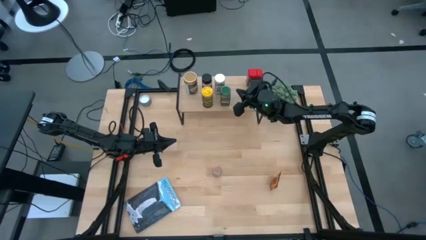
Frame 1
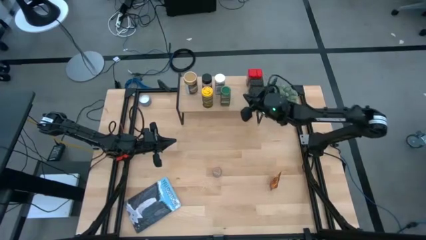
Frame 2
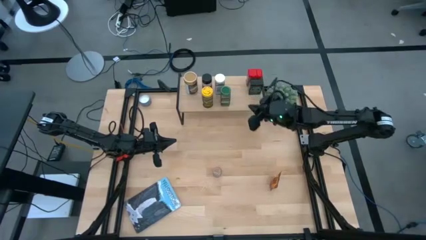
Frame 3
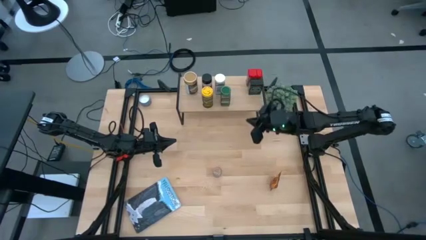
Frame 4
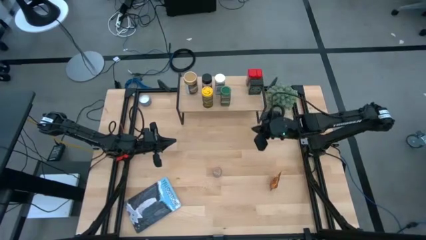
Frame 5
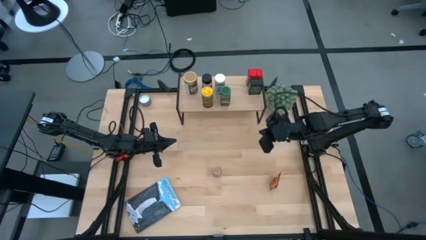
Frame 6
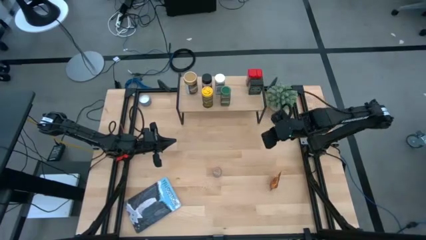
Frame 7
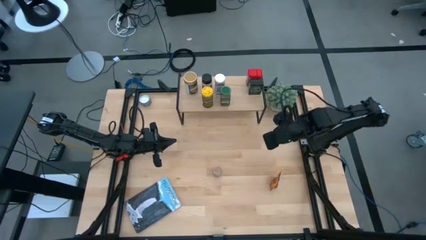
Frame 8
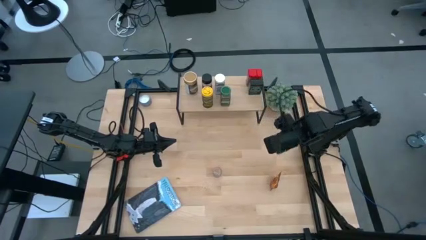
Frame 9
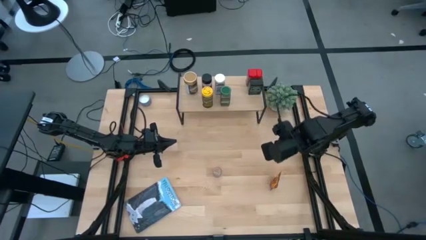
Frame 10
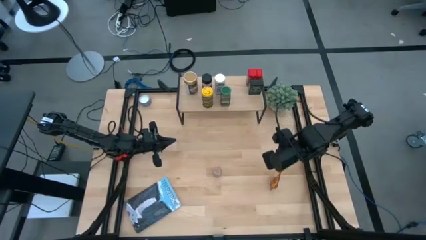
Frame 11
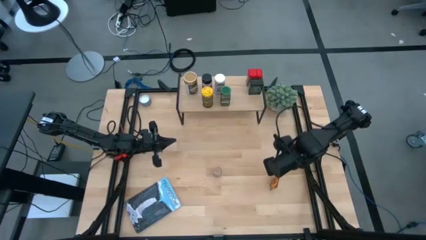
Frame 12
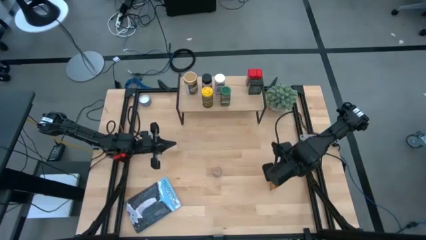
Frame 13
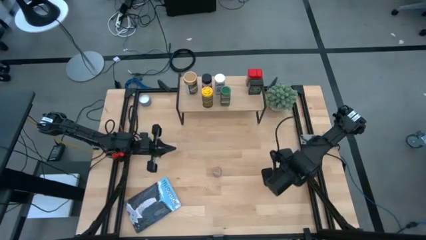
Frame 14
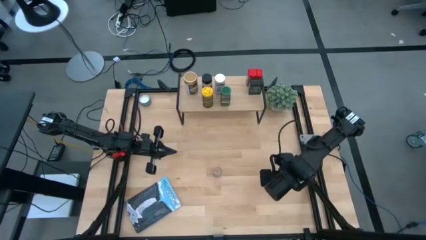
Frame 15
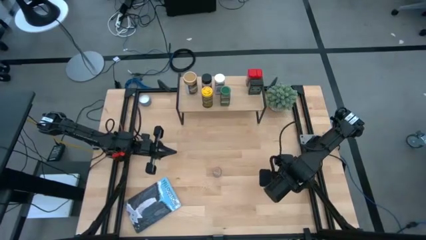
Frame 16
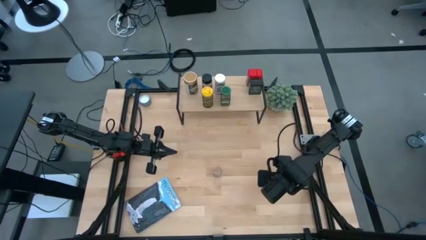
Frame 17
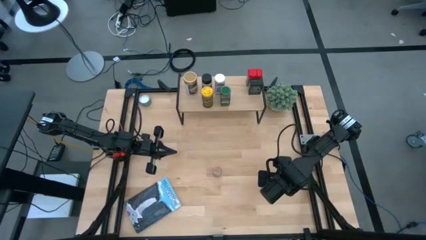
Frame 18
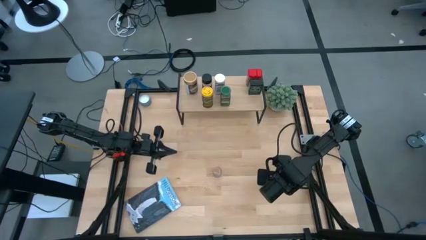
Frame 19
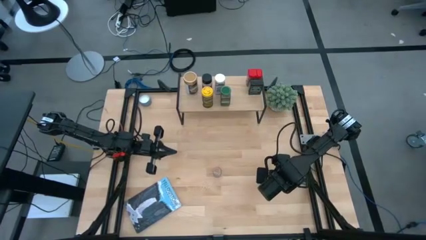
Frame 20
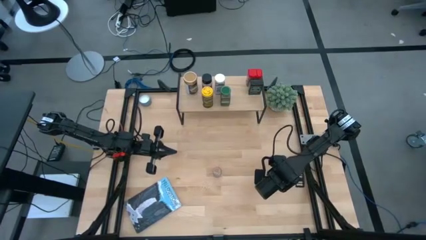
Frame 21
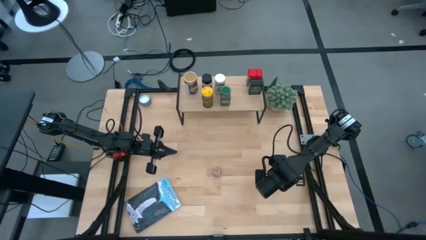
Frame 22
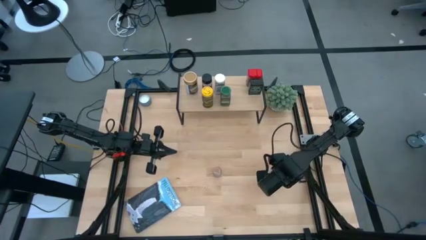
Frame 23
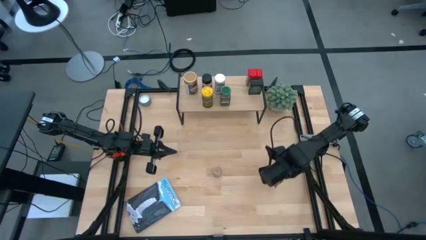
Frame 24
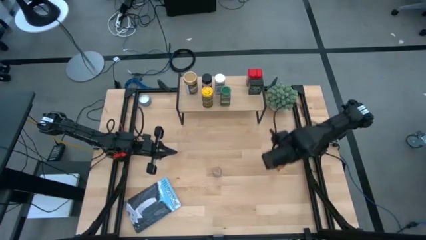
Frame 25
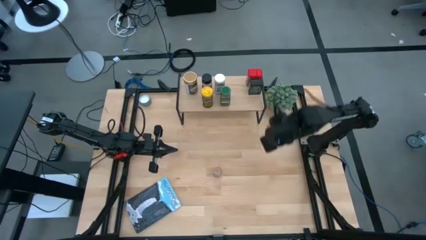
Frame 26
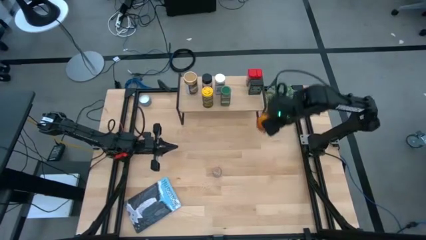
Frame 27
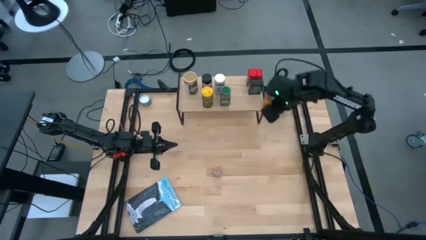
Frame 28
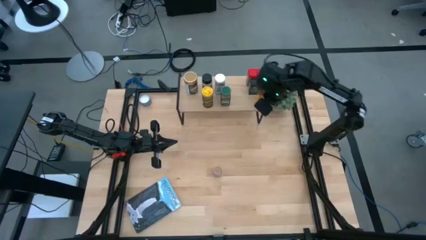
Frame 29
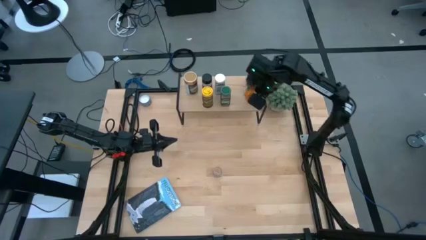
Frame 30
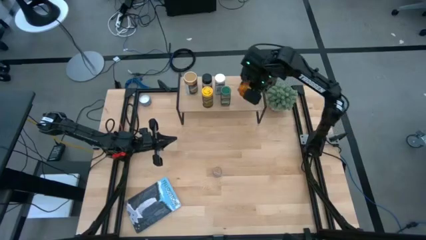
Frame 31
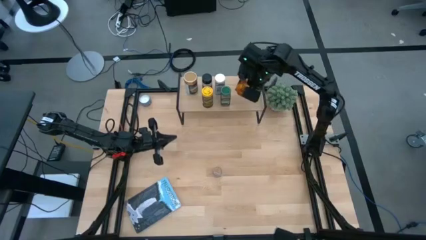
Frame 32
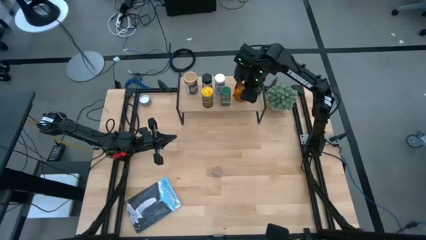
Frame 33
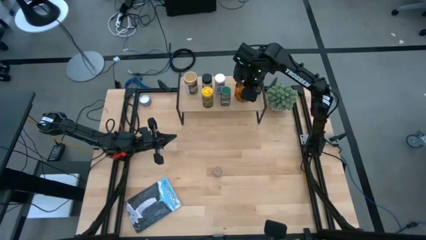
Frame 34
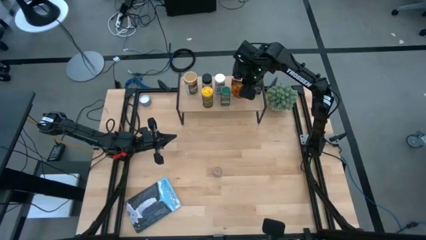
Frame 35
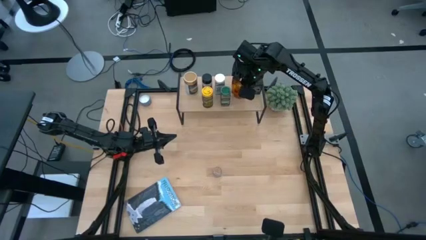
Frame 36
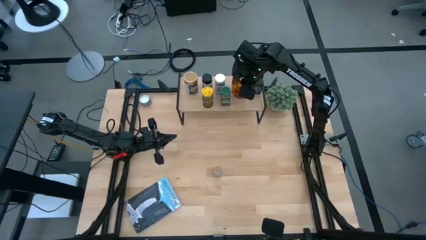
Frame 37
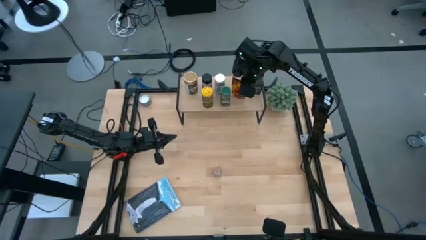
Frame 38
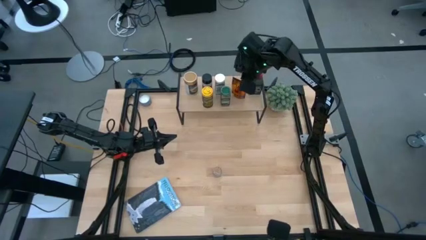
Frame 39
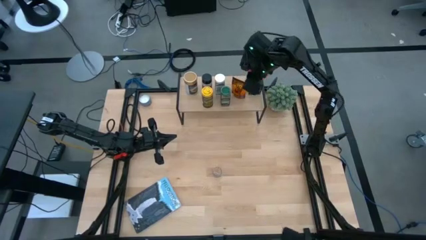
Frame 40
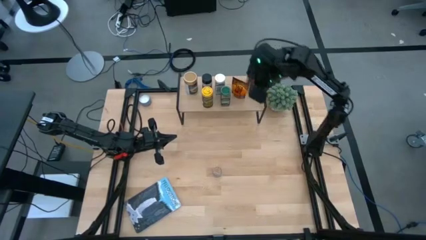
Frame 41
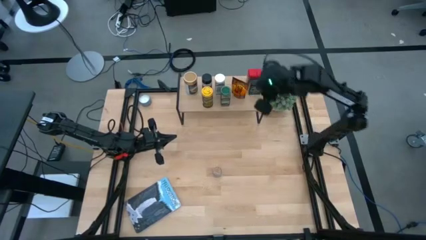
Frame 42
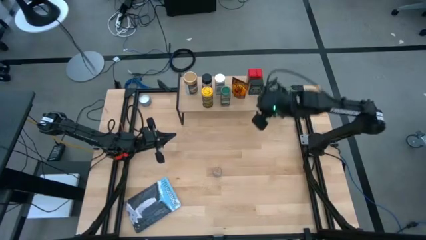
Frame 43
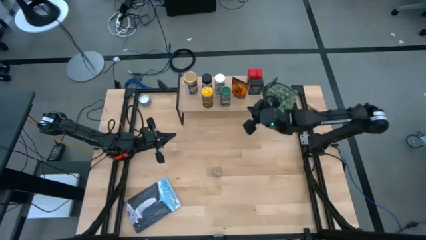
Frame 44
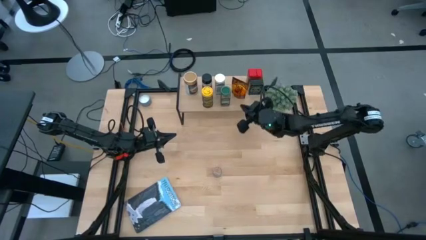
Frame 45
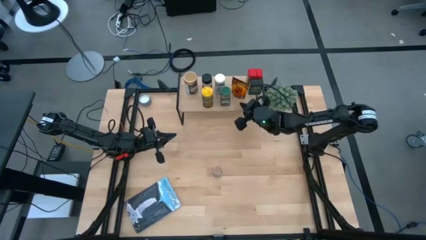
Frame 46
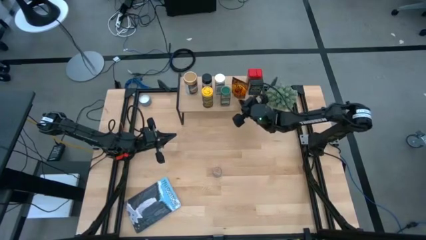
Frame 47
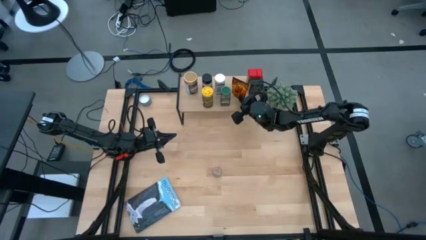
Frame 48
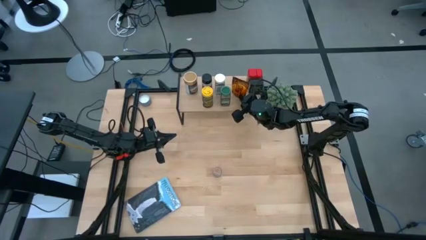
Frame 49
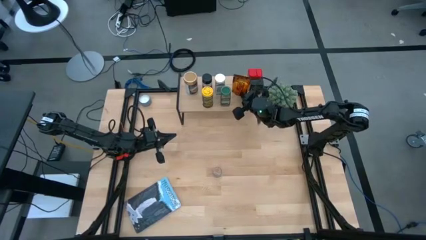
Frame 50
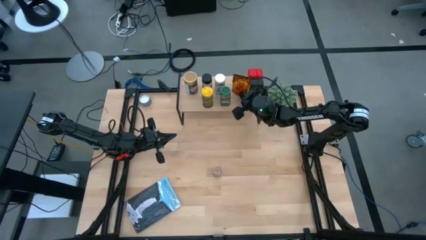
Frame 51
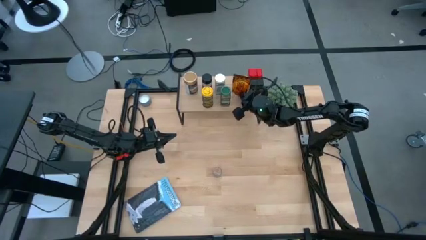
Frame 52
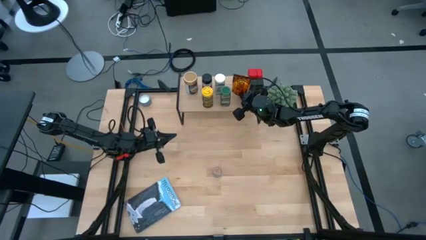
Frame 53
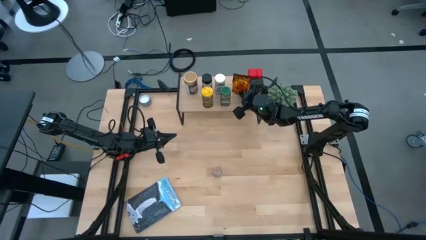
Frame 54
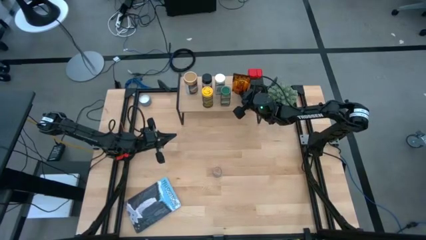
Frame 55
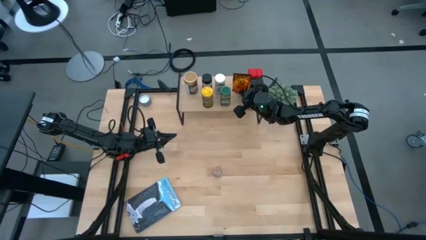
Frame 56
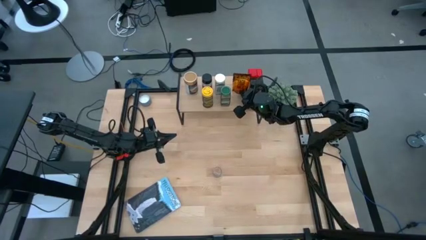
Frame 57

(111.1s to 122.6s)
Task: Shelf spices
Put the orange seasoning bag on the shelf

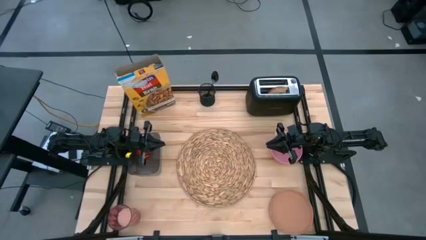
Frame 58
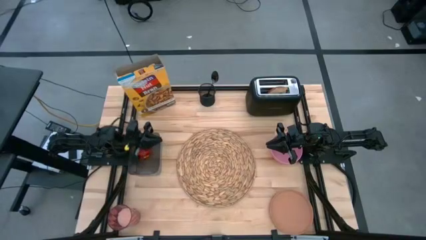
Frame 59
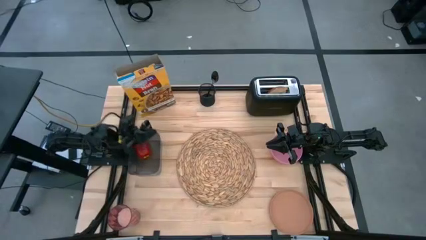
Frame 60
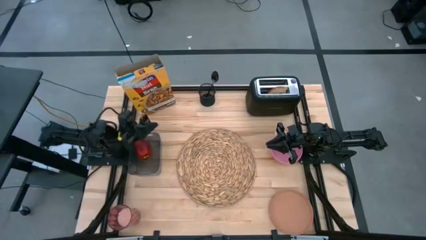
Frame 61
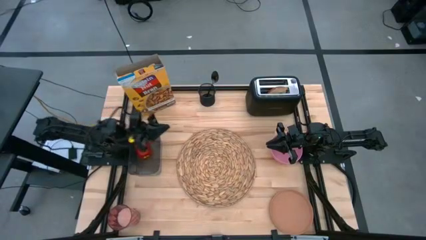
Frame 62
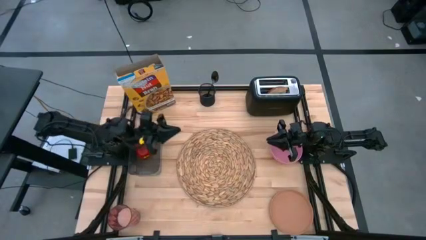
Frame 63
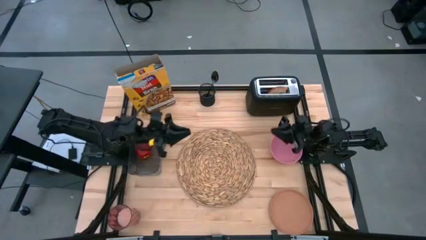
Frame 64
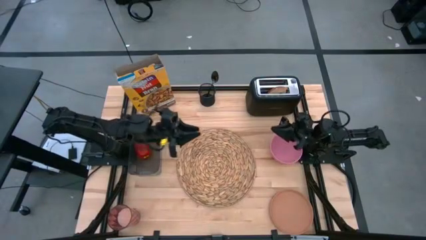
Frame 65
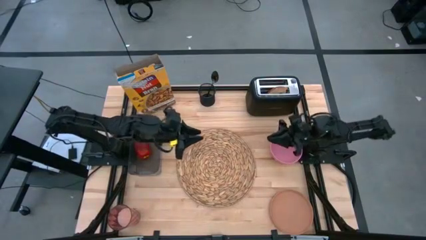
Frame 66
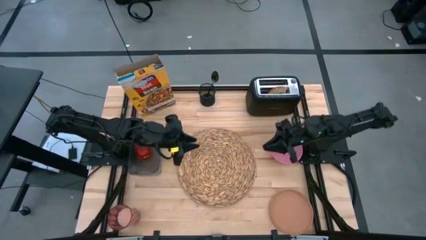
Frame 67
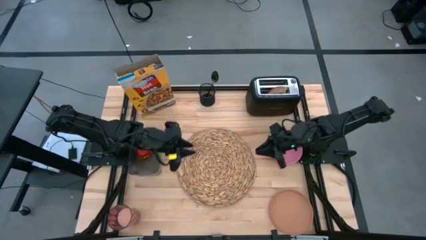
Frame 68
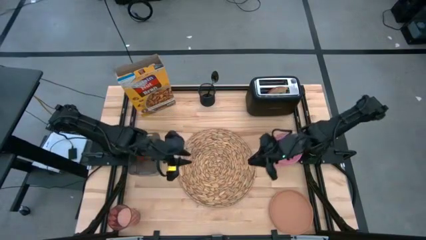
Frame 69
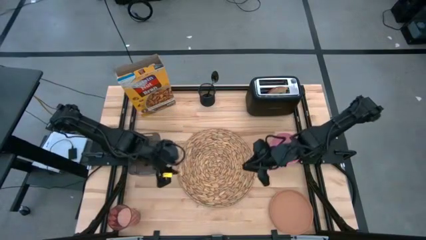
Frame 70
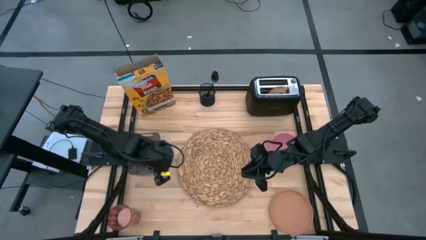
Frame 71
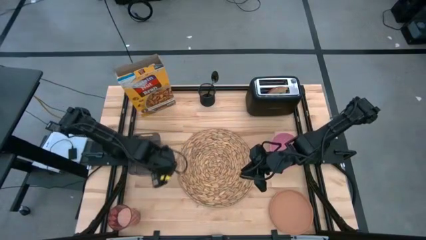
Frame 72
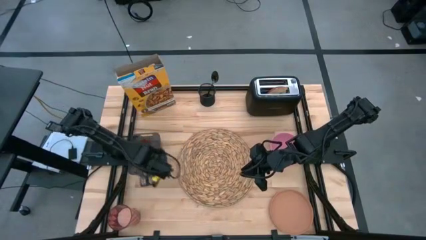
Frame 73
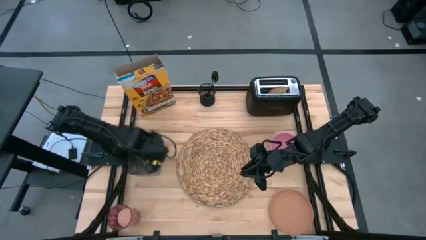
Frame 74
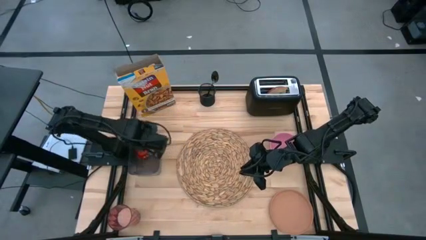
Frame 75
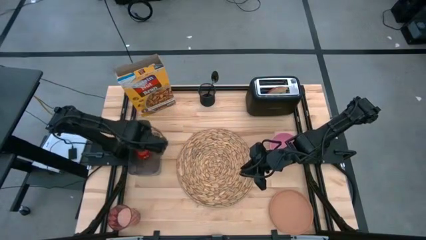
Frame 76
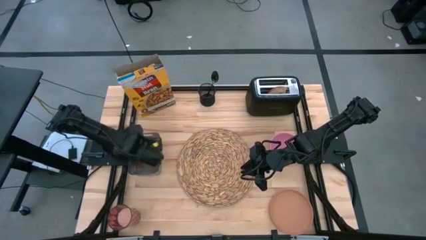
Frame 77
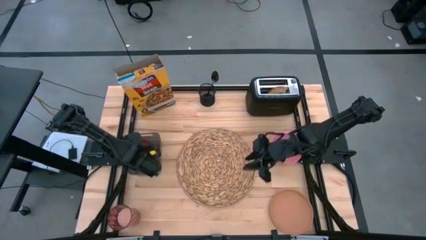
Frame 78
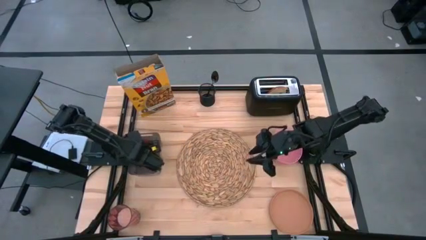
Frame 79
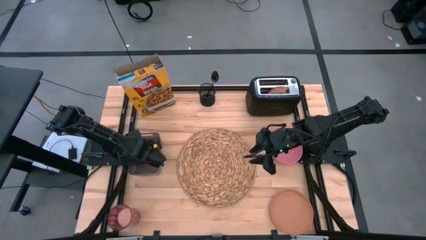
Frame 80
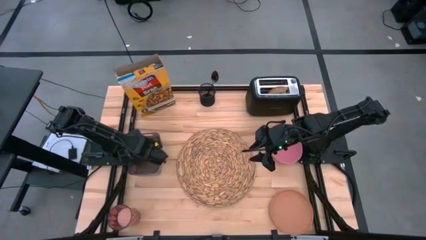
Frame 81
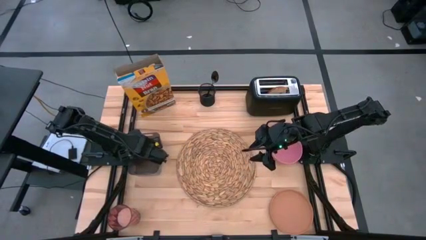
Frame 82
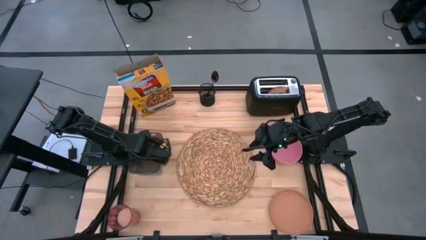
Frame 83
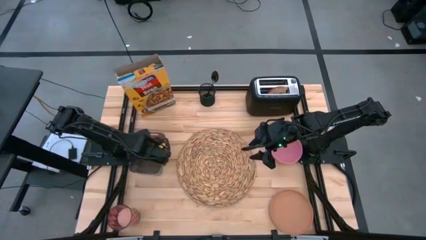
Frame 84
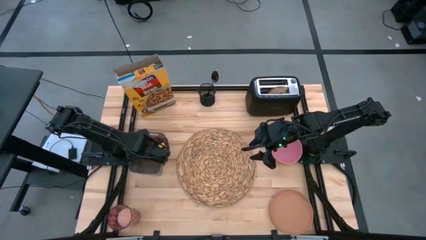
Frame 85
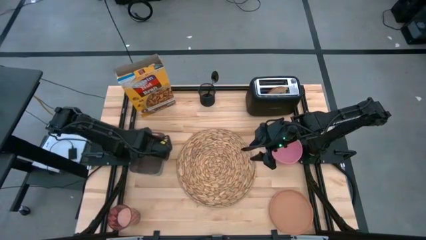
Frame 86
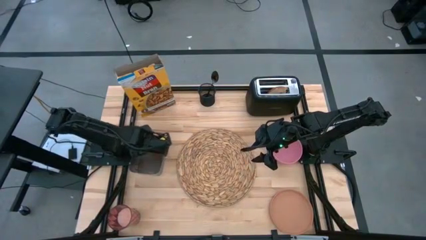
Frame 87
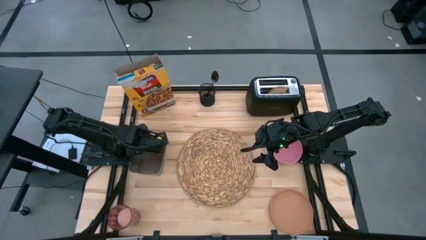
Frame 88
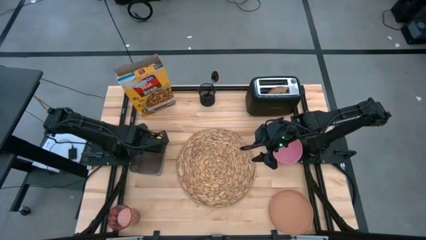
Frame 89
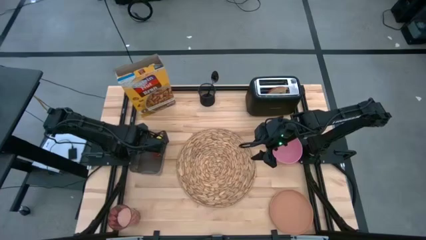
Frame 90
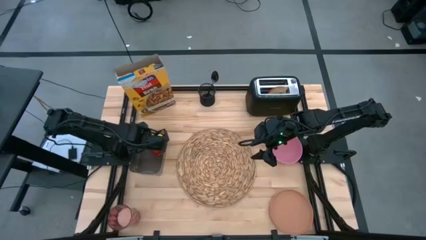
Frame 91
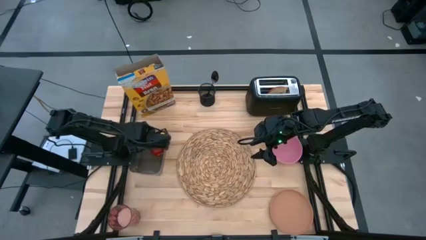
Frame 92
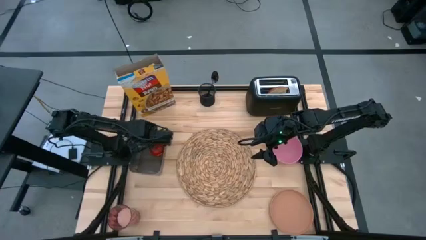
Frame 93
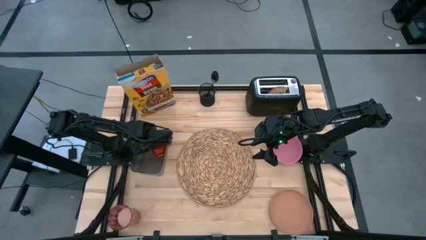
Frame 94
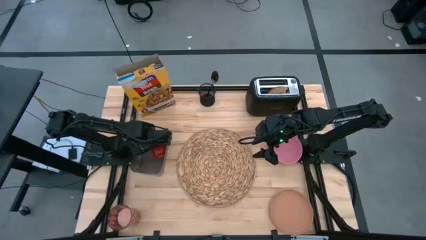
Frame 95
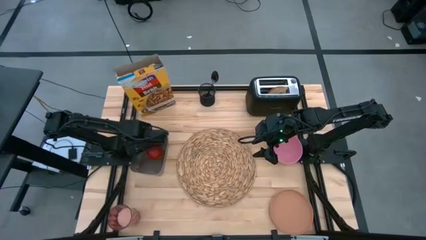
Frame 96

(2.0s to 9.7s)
Task: Arrange a breakfast setting
Put the apple on the brown placemat
